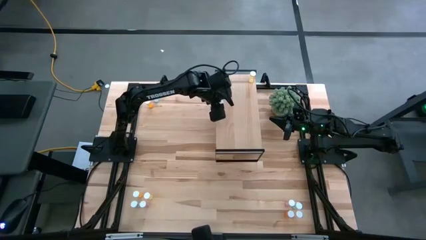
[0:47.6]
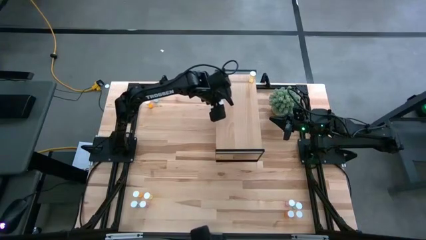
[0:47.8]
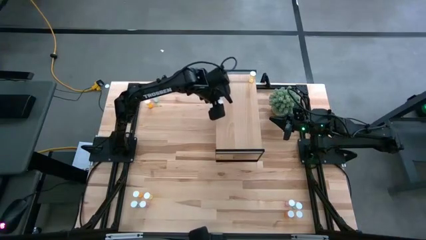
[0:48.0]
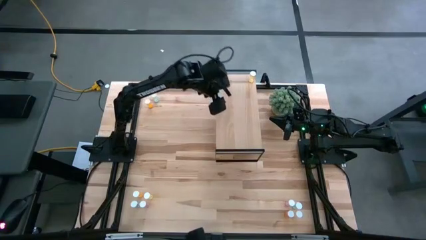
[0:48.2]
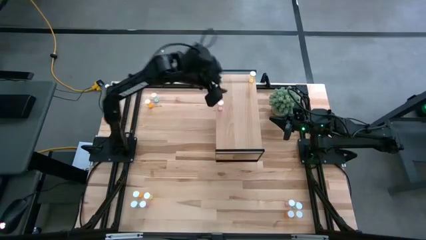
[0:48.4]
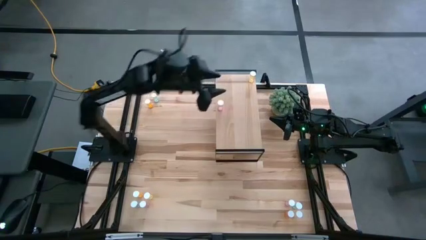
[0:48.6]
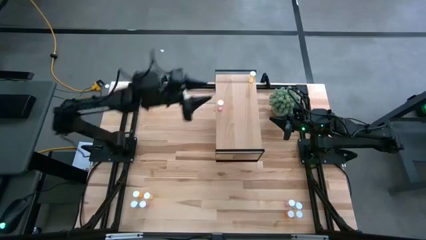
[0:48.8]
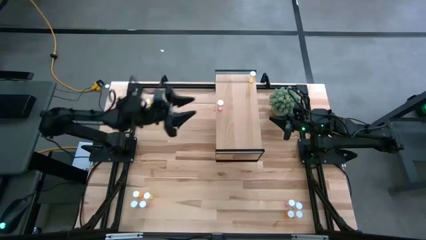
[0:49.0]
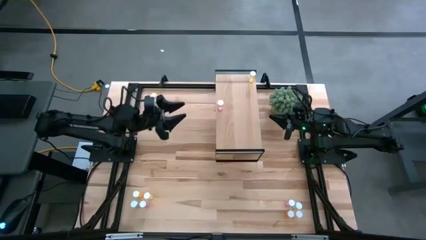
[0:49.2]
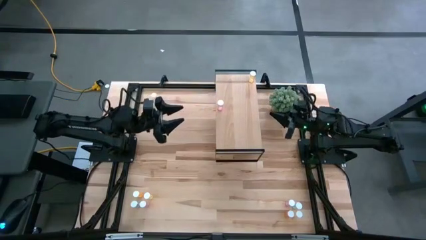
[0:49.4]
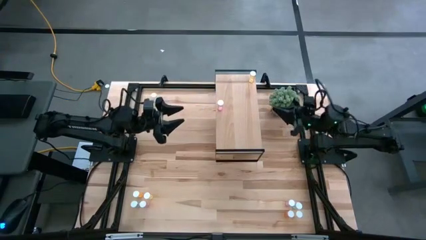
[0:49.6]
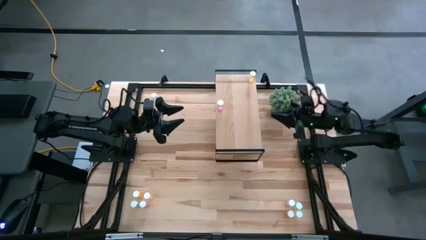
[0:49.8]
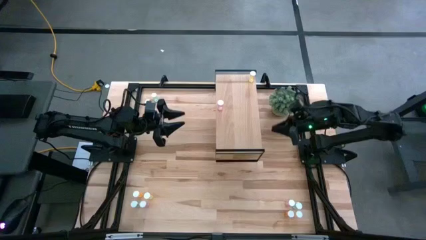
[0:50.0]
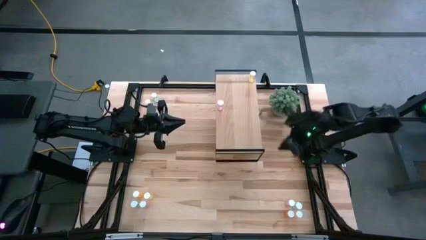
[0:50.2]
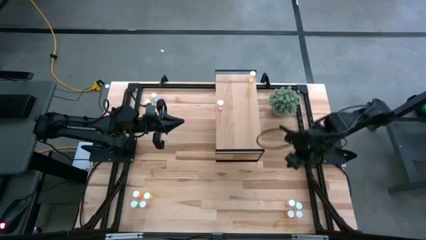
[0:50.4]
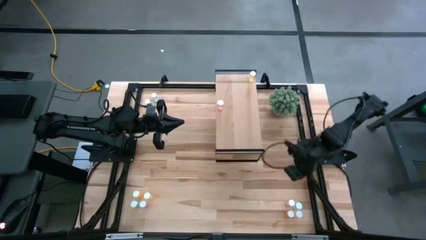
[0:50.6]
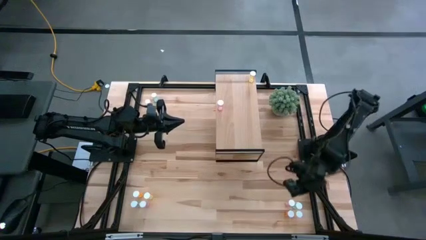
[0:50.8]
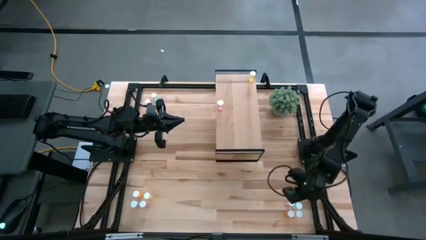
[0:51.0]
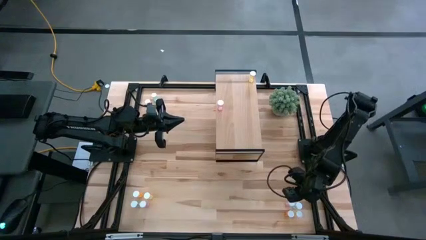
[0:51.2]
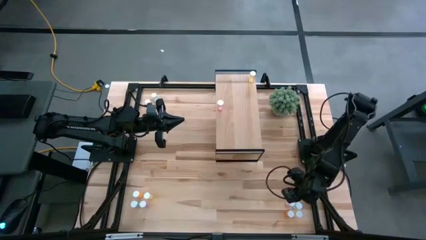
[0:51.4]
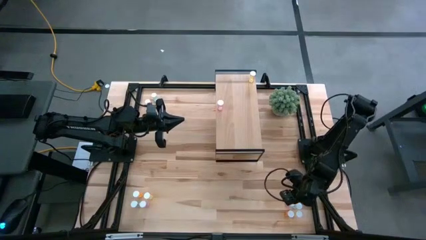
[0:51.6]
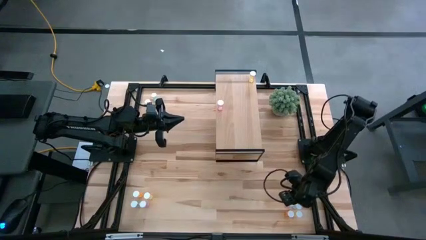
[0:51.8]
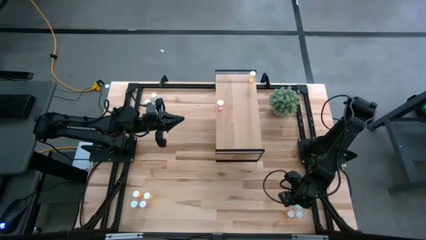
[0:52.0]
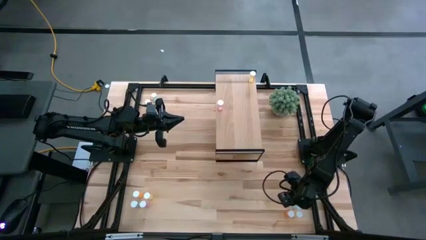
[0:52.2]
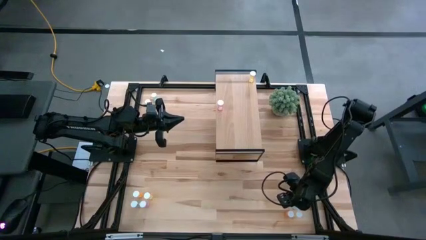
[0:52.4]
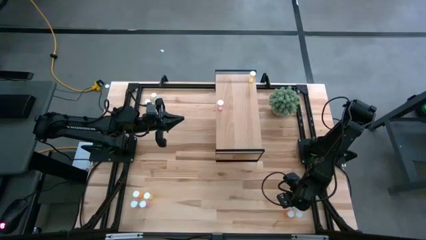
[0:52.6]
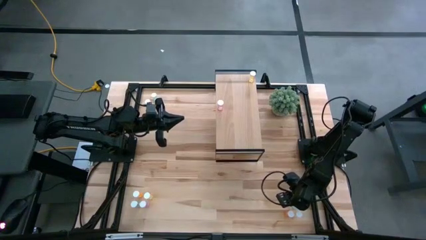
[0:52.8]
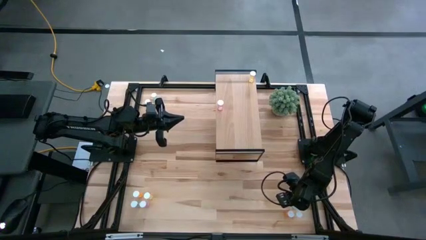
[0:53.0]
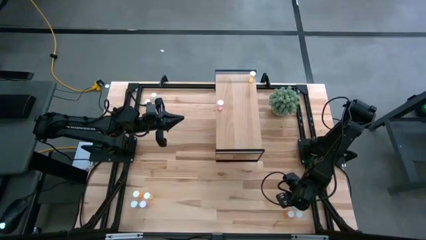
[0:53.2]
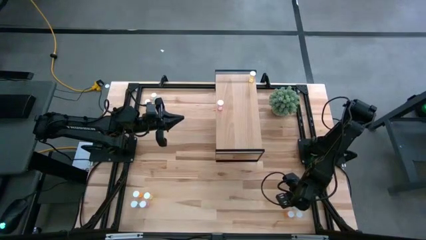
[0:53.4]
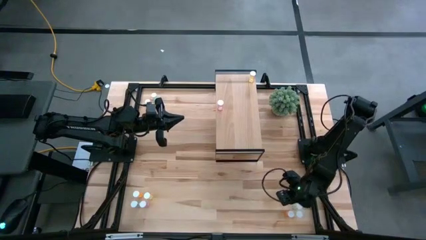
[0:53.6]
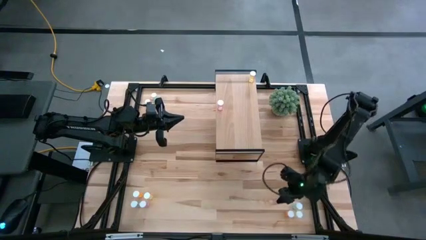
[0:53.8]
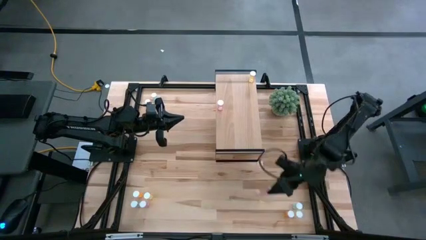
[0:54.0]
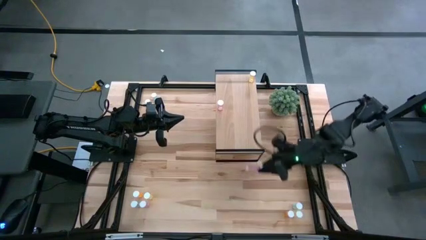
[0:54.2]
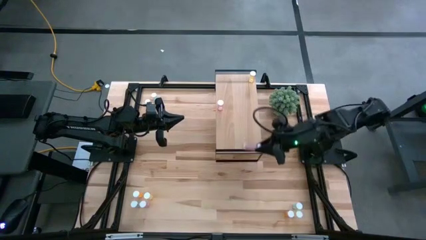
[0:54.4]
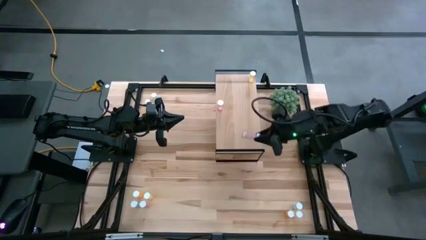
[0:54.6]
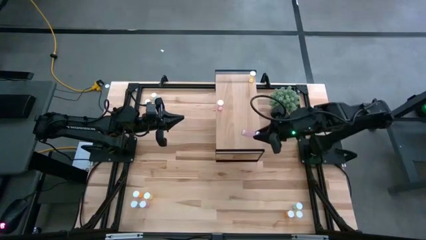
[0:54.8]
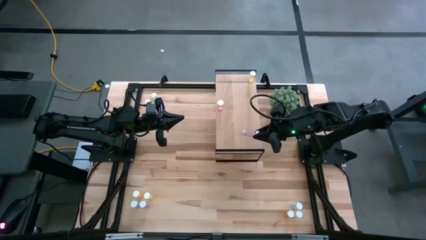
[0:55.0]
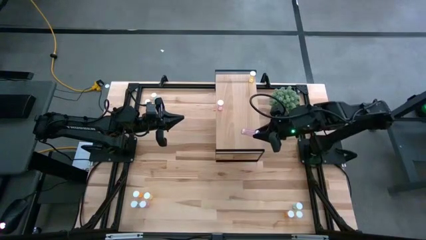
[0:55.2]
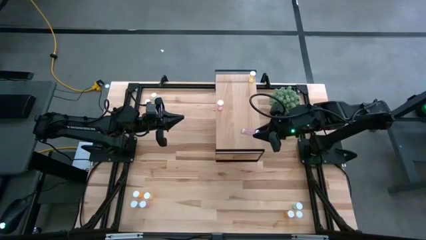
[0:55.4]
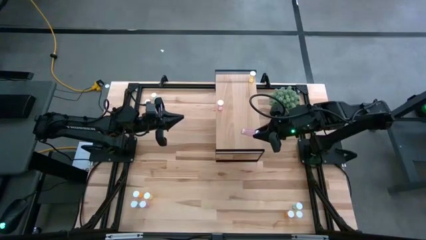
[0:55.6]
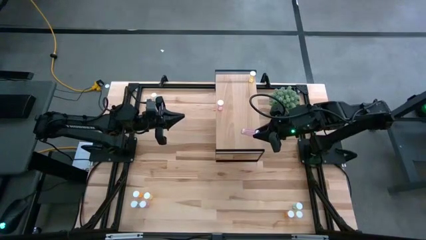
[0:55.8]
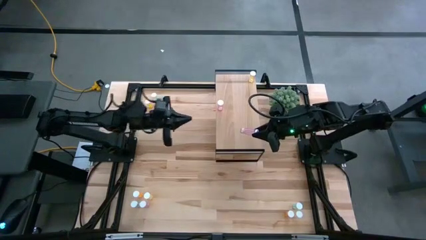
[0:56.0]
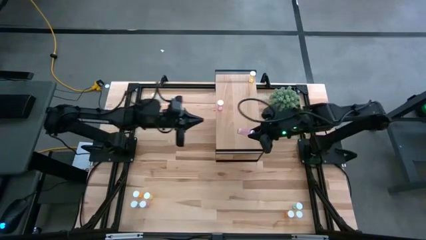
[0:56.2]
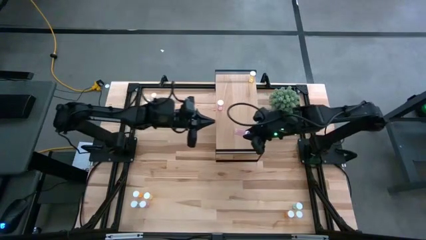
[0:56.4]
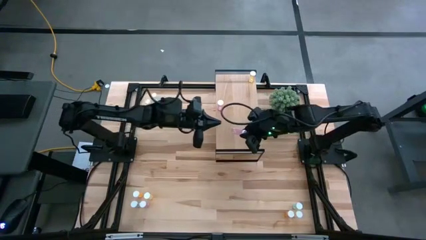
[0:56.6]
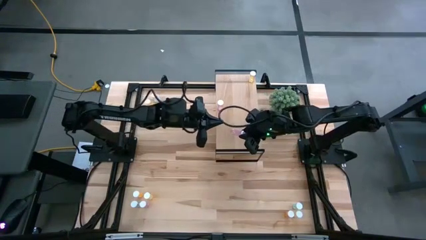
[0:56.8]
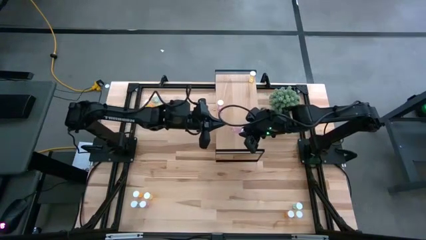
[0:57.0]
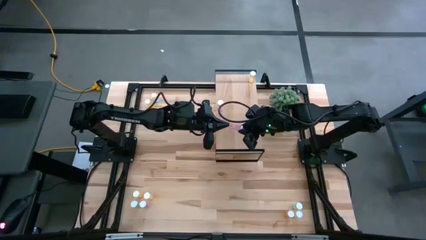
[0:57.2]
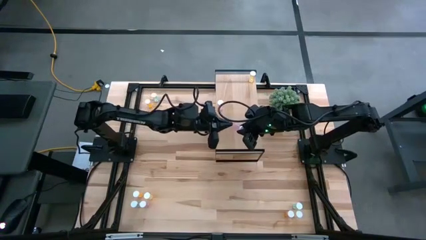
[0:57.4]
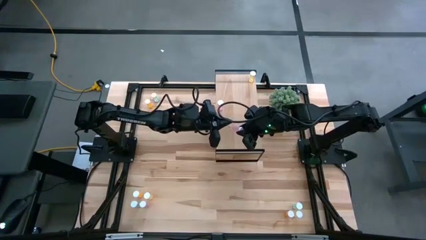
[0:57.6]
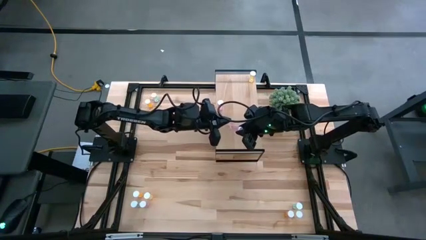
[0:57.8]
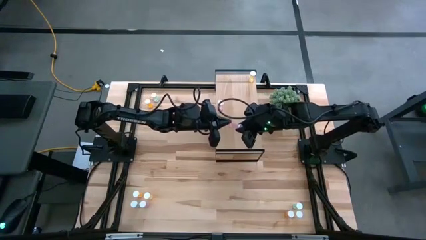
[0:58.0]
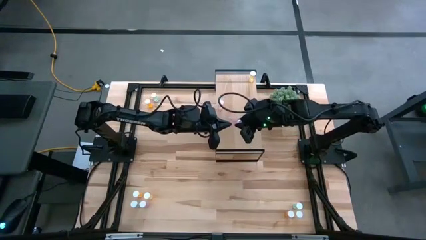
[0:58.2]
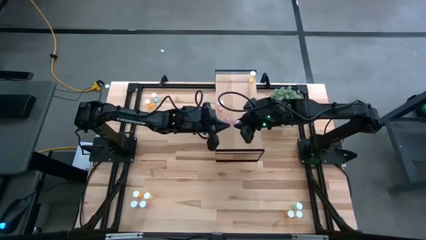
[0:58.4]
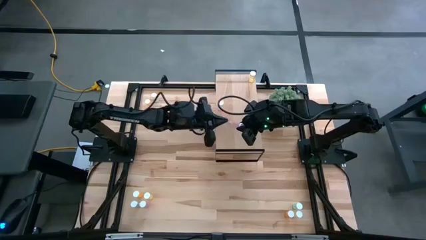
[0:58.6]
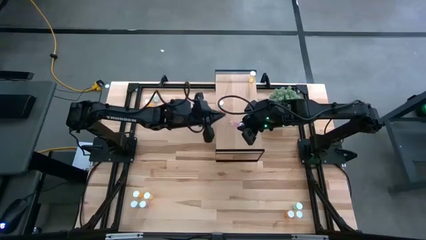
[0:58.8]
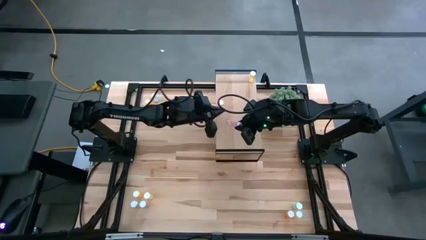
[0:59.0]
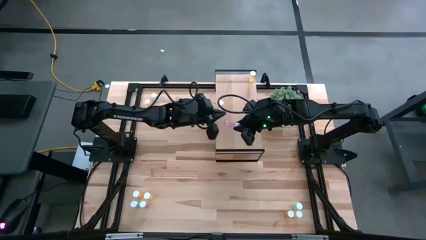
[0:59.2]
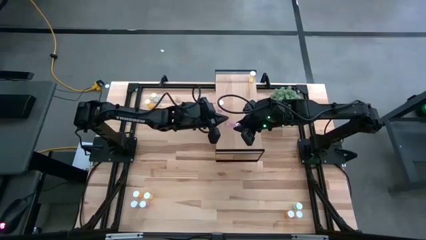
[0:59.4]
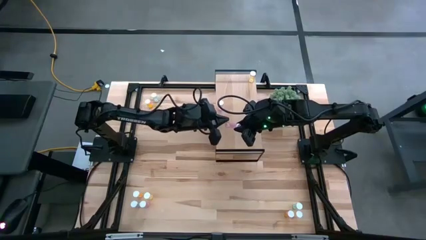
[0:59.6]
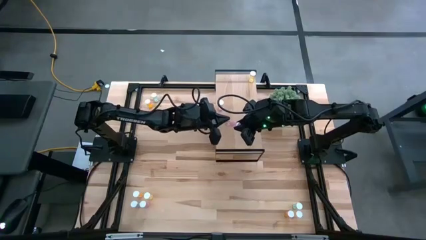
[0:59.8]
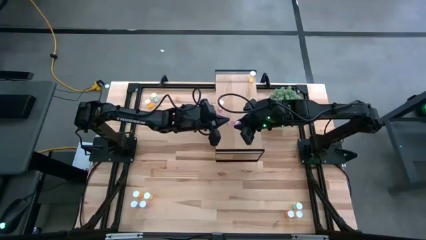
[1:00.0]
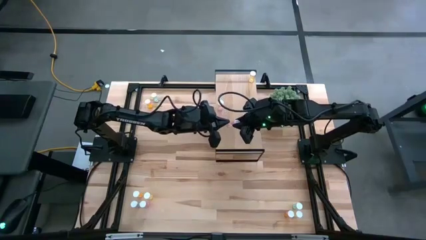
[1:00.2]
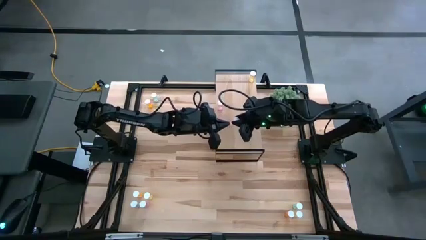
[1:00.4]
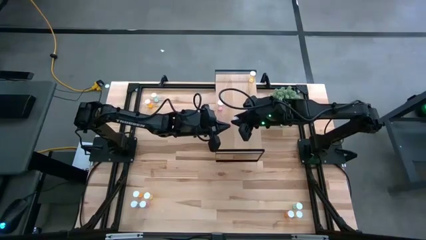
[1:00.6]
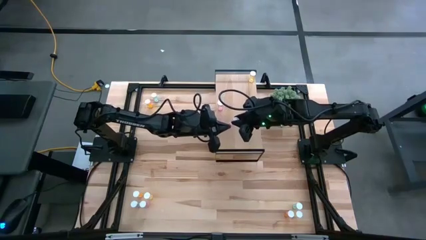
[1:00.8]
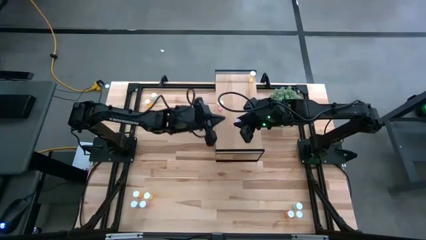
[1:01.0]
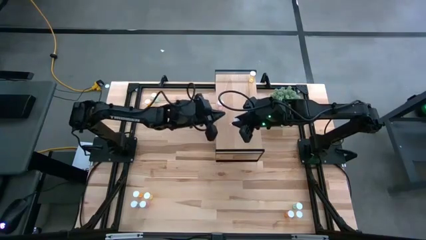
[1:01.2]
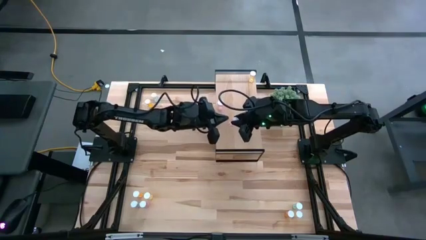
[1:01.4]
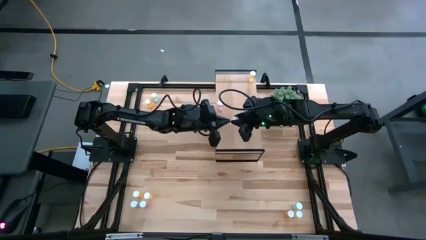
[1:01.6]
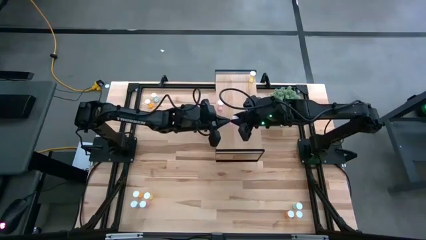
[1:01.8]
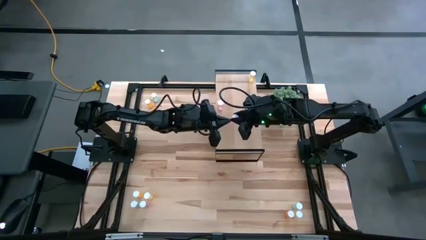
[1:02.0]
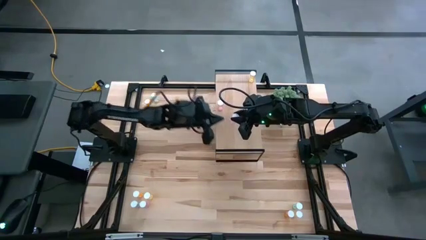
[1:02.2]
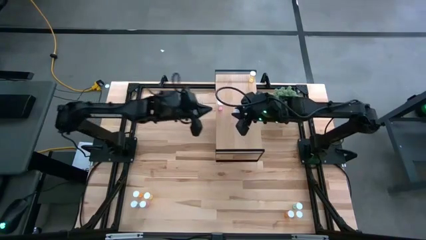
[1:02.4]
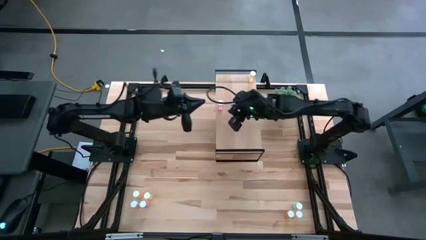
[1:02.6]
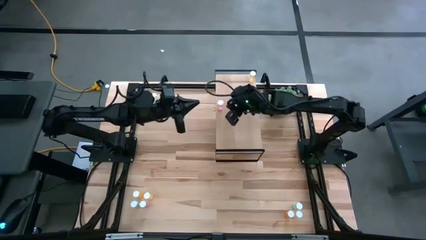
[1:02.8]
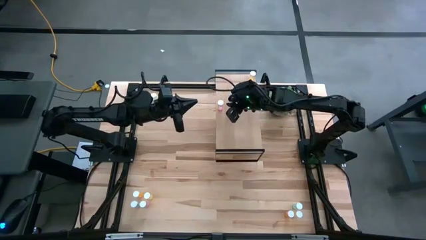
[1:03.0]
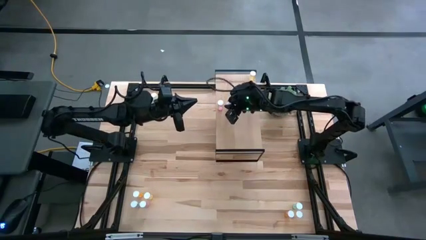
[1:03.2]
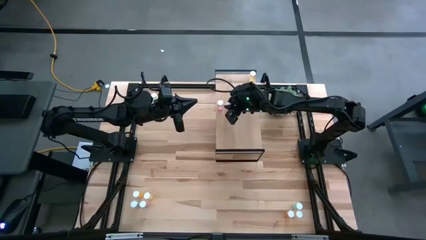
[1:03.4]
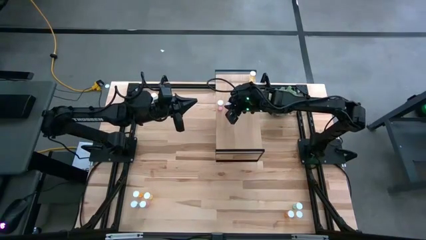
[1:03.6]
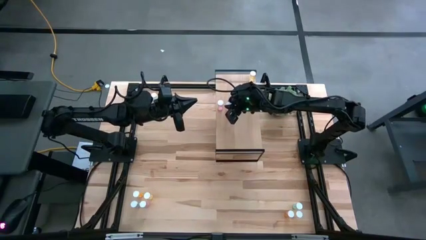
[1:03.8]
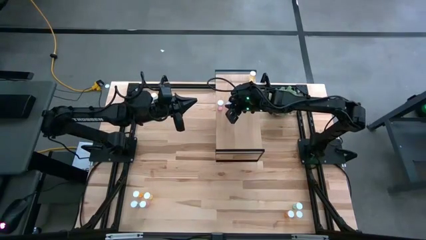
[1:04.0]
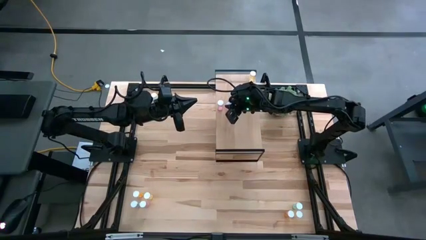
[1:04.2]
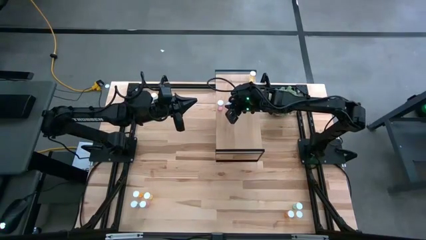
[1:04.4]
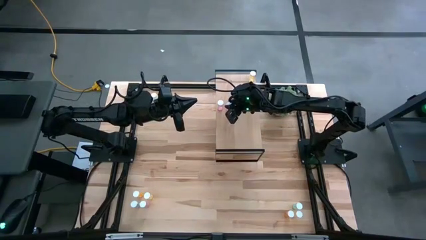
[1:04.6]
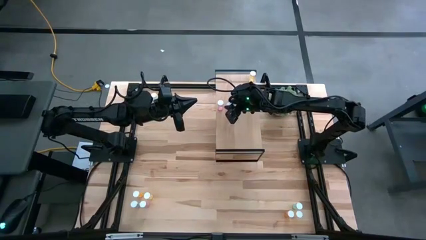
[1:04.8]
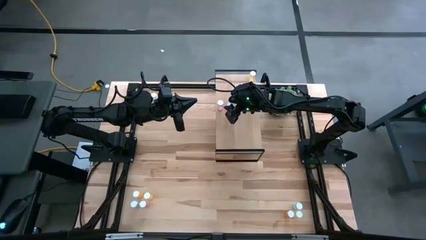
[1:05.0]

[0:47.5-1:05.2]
Task: Pick and place medicine bottles onto shelf by color
Put the right pink pill bottle on the shelf aligned with the other pink pill bottle
